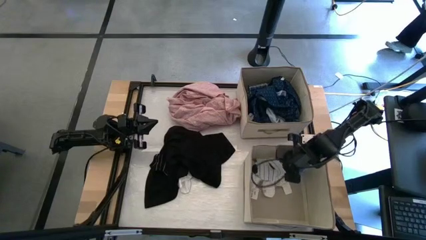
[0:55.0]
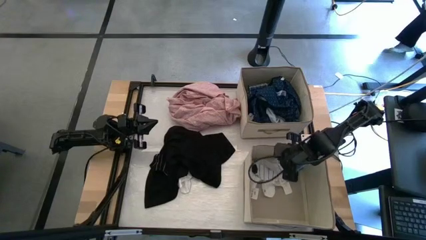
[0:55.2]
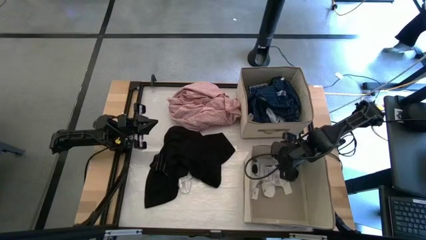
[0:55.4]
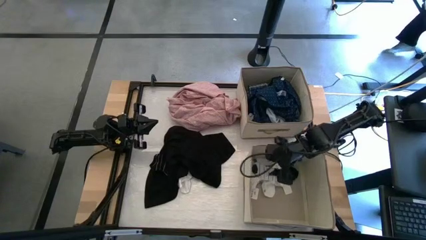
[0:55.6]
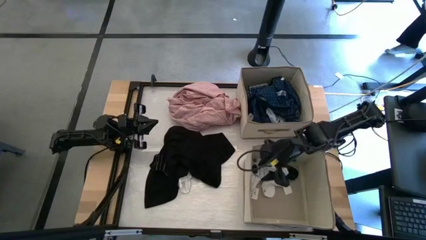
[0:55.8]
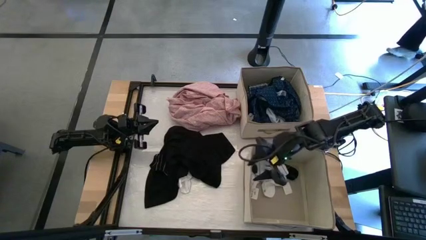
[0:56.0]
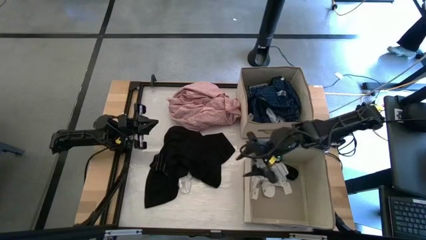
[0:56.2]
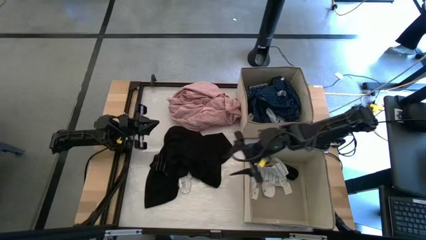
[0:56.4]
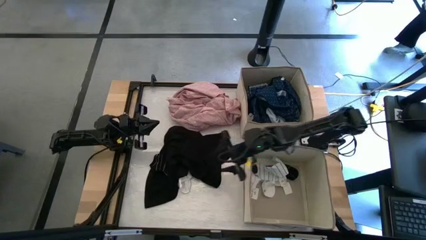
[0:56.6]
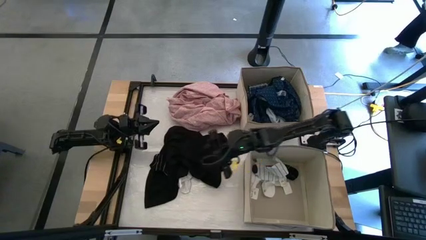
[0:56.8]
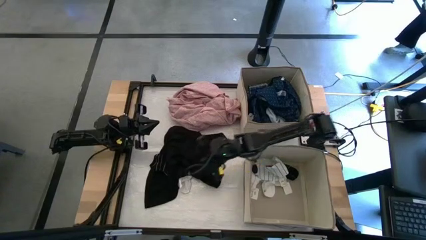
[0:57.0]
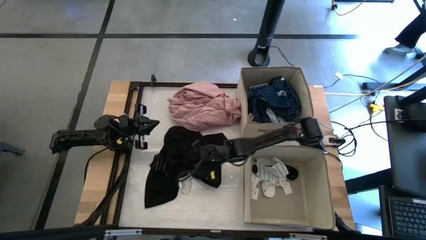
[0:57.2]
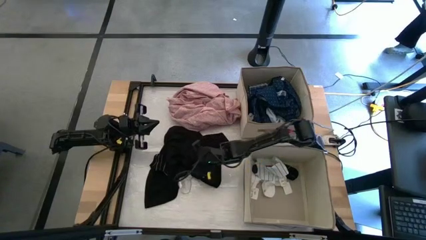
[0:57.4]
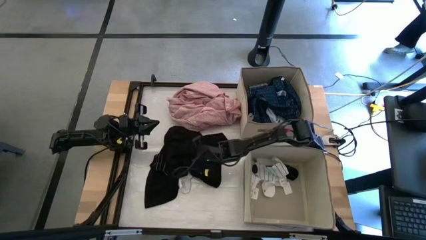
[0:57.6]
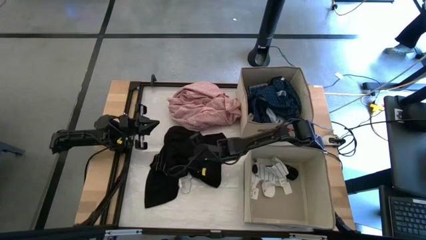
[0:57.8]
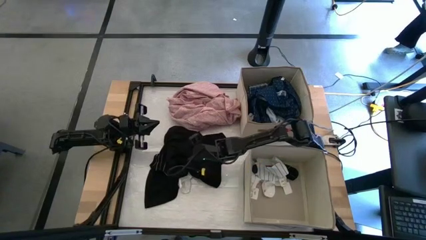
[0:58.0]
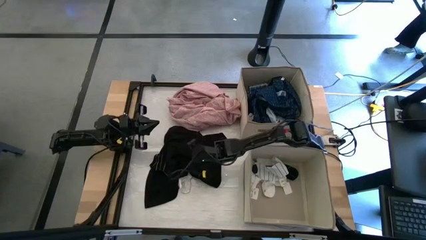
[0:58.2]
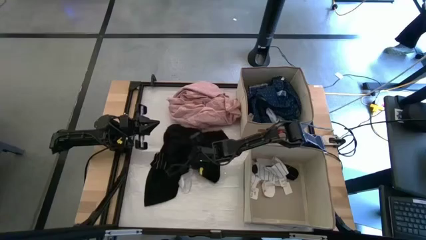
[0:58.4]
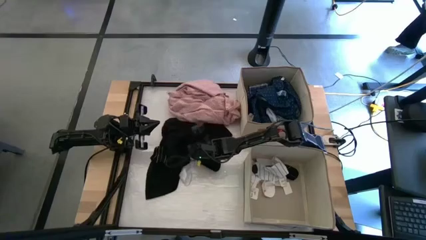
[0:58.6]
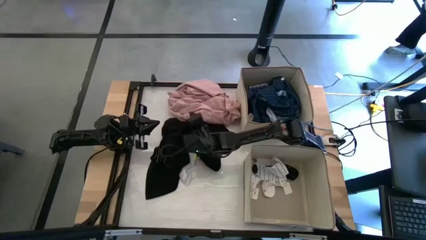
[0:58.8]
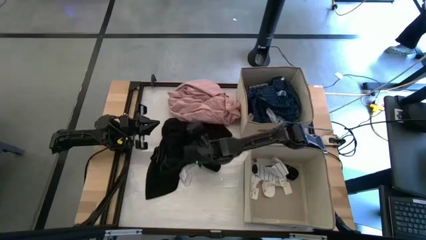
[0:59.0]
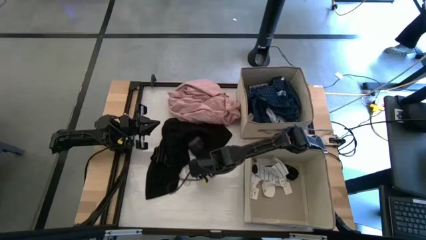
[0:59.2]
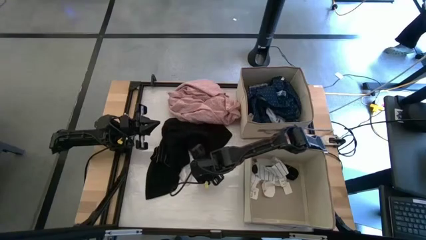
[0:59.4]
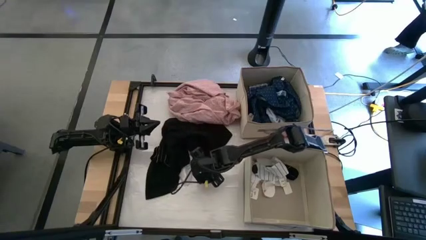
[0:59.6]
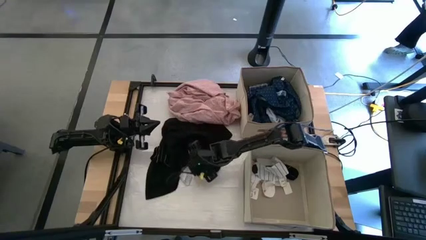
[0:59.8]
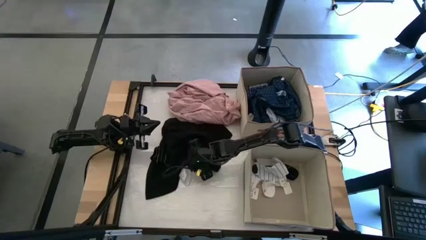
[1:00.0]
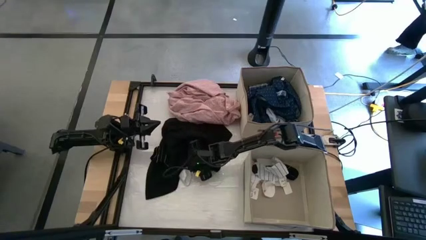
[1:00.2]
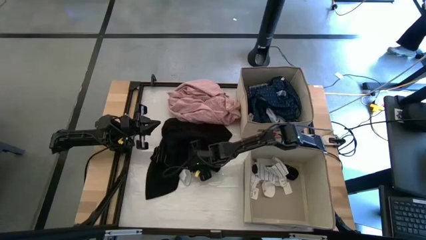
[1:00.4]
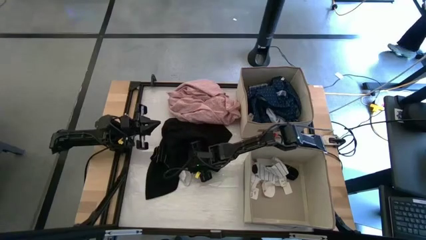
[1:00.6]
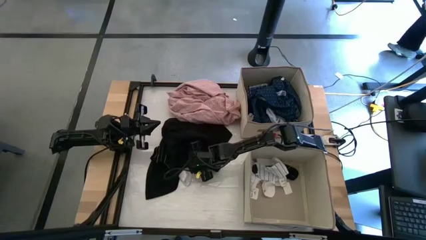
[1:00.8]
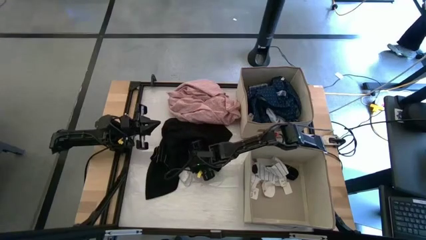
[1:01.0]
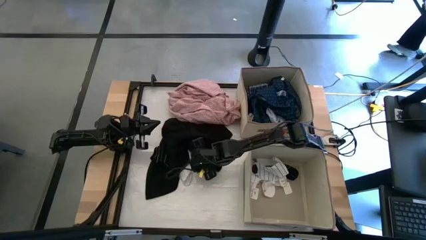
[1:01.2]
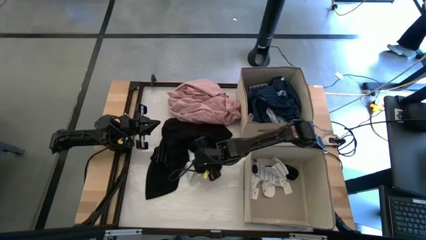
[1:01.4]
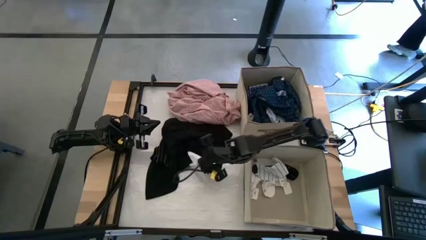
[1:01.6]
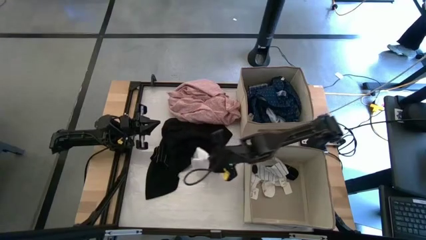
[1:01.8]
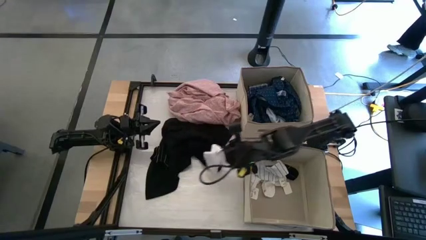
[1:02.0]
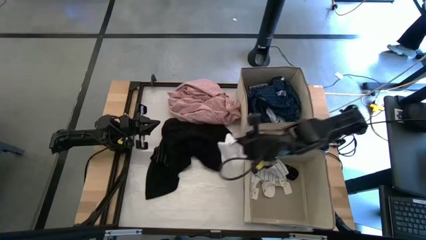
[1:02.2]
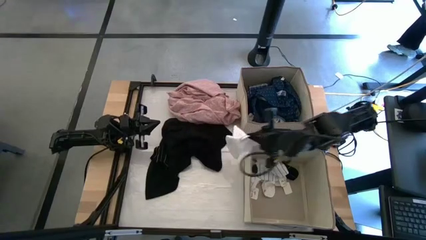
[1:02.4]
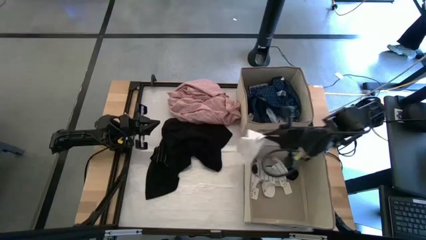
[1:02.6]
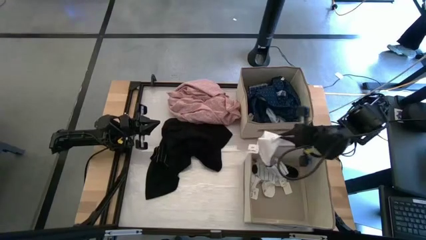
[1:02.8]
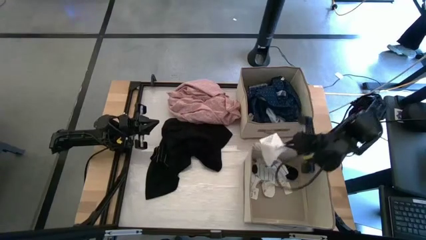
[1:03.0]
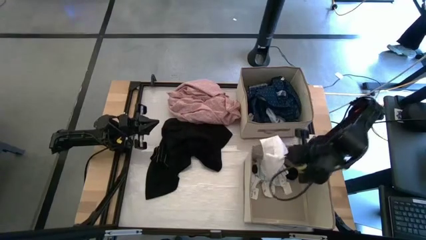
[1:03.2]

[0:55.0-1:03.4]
Task: Sort clothes
Put the white sock into the bottom laundry organizer

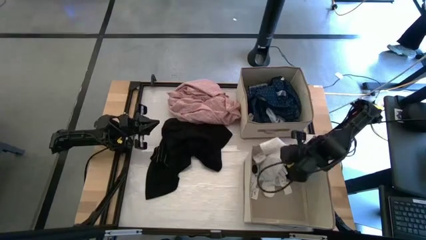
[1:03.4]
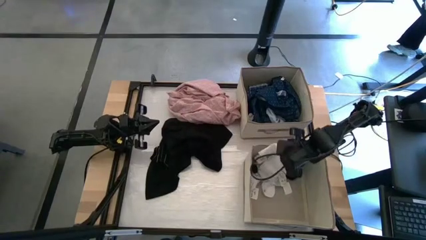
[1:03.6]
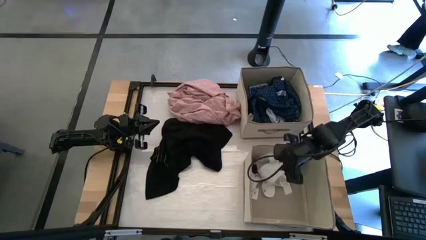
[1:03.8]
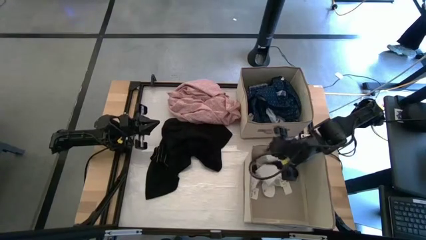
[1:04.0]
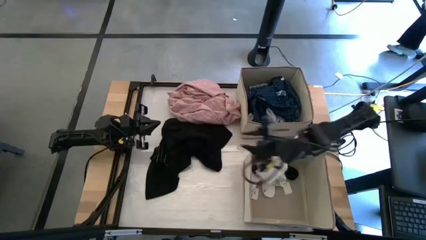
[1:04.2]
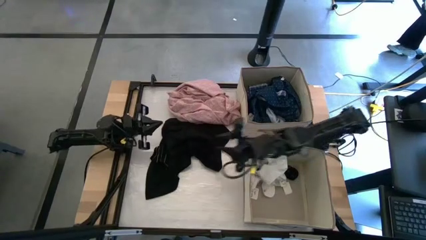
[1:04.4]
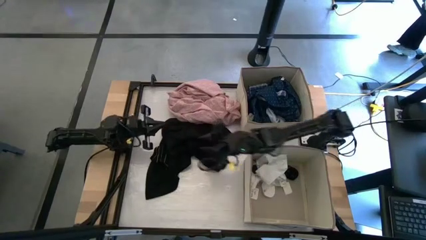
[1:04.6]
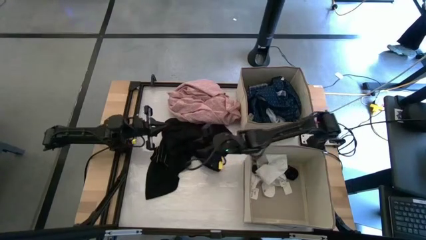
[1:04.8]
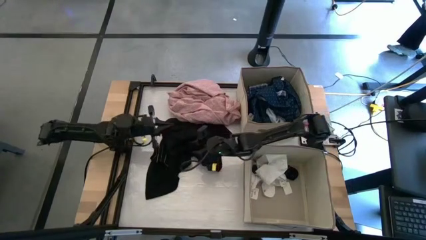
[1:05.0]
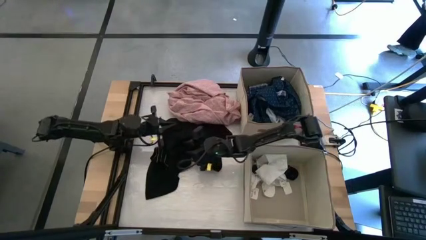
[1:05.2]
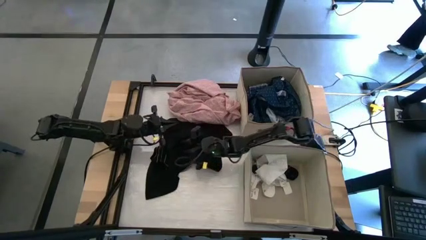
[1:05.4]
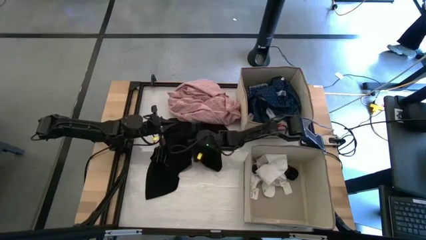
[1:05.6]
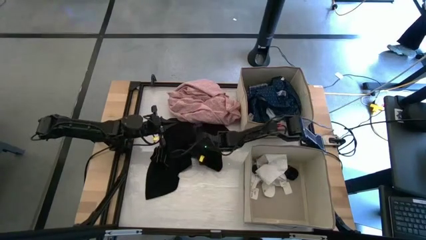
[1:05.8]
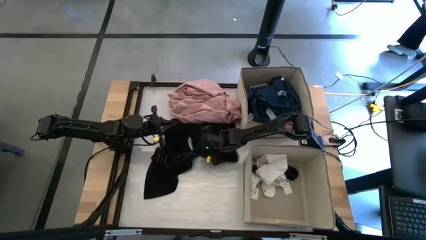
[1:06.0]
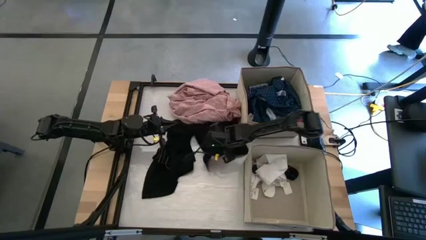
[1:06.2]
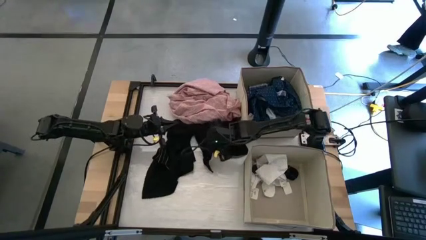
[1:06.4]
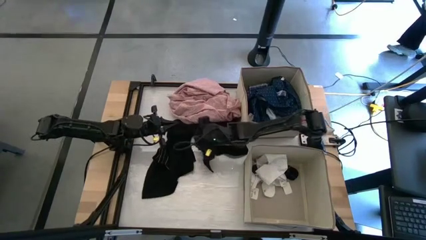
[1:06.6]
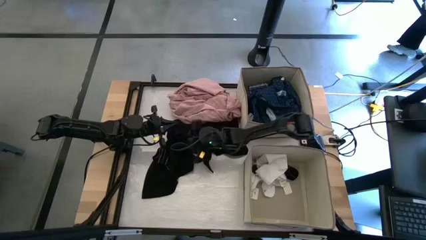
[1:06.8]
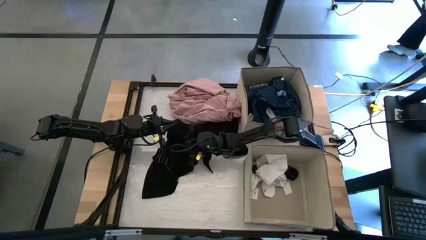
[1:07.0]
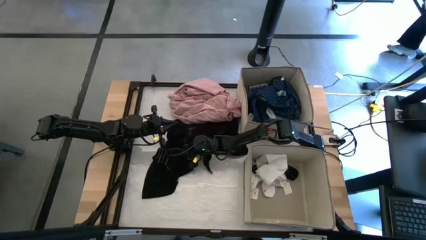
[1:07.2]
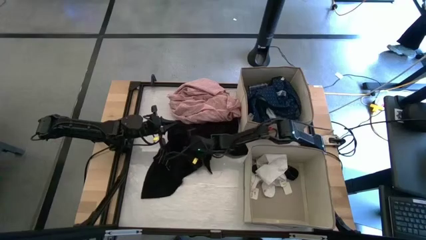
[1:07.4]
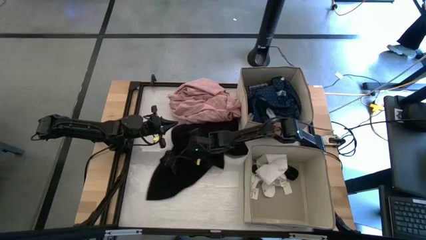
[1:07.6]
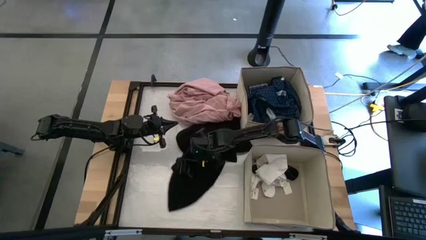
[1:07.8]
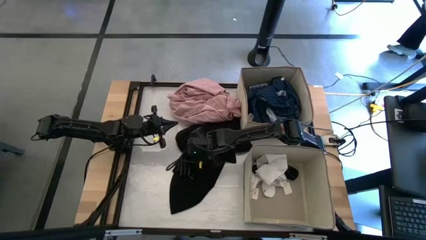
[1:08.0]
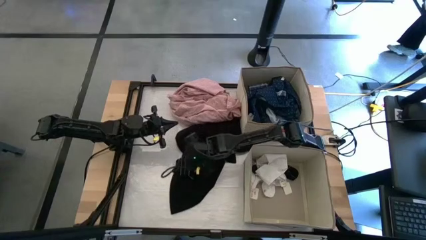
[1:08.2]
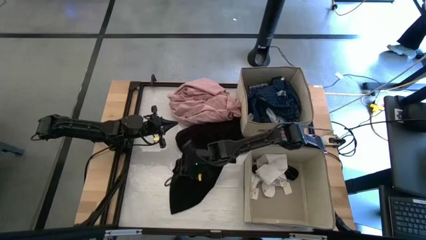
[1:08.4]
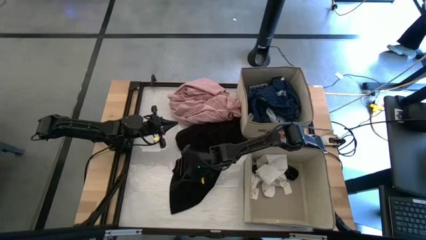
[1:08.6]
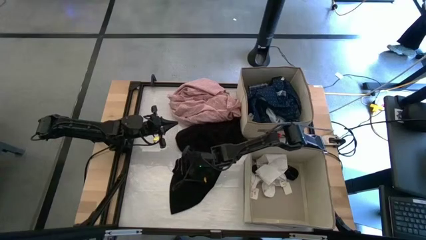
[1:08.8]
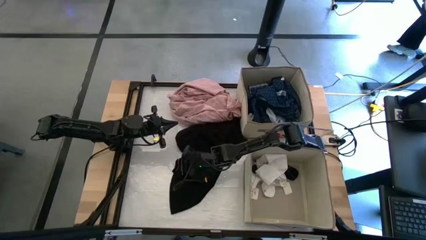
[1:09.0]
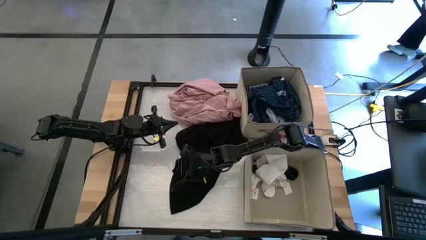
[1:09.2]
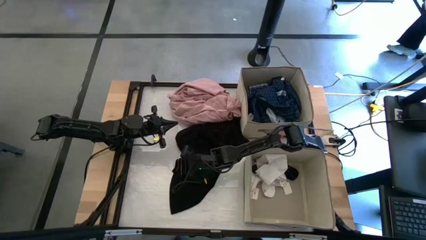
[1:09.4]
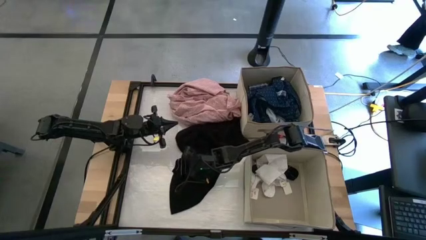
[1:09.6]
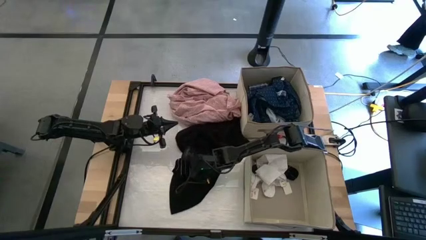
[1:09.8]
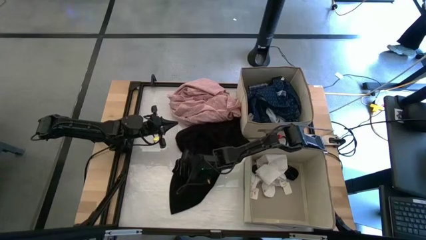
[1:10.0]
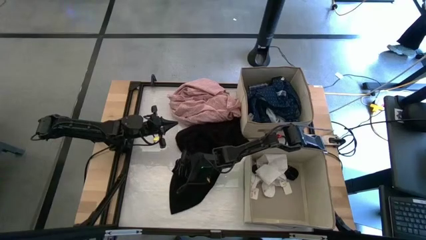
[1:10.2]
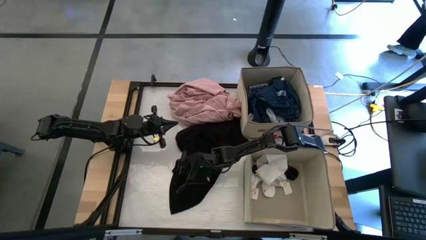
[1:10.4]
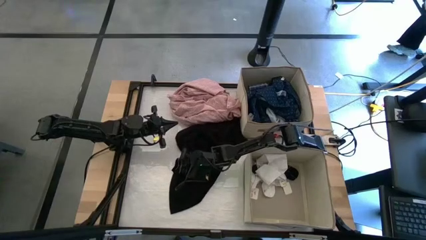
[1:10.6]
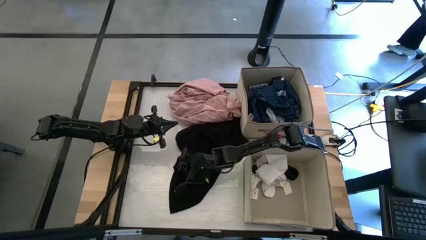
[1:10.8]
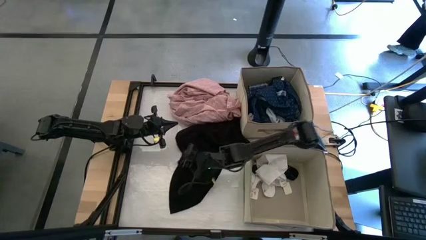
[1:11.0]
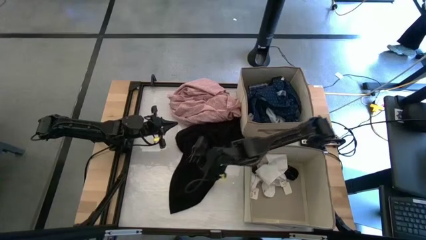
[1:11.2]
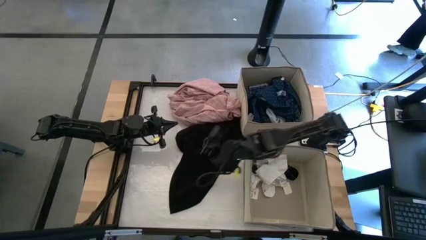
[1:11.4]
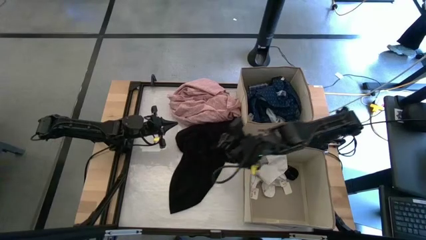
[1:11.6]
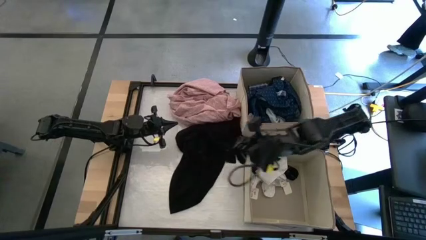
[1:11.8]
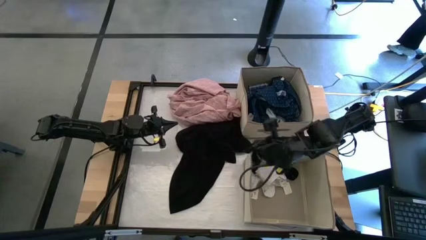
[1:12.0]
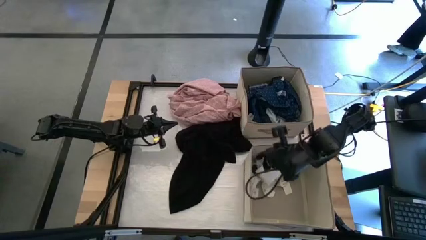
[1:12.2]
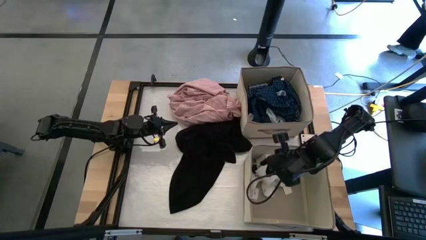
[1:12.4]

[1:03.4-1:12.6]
Put the black sock into the bottom laundry organizer
